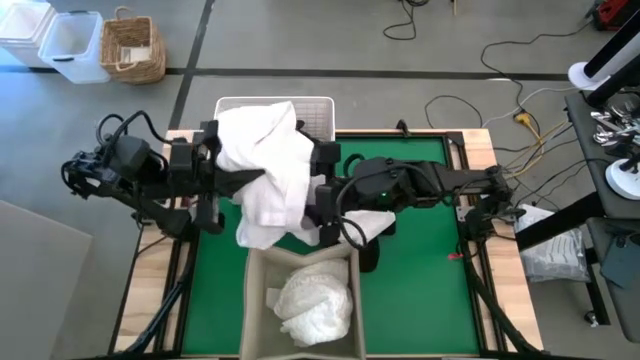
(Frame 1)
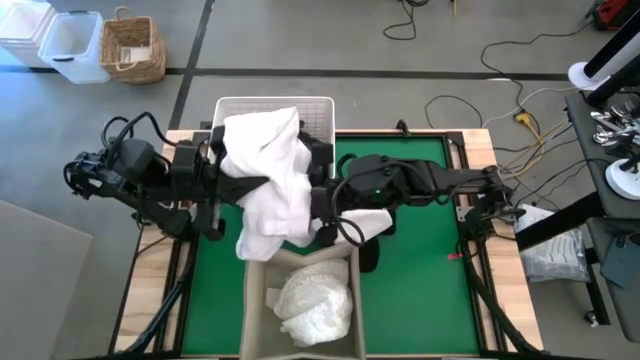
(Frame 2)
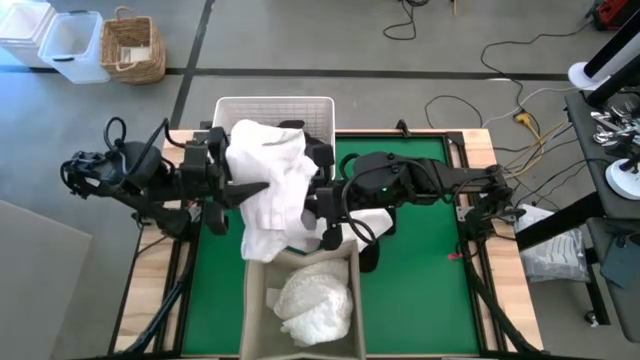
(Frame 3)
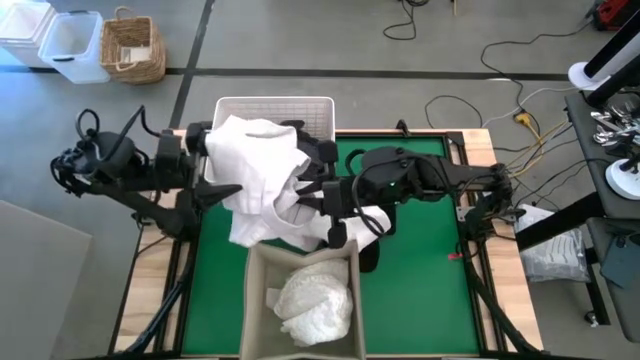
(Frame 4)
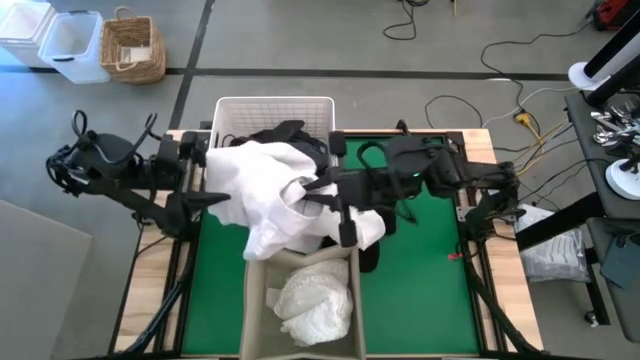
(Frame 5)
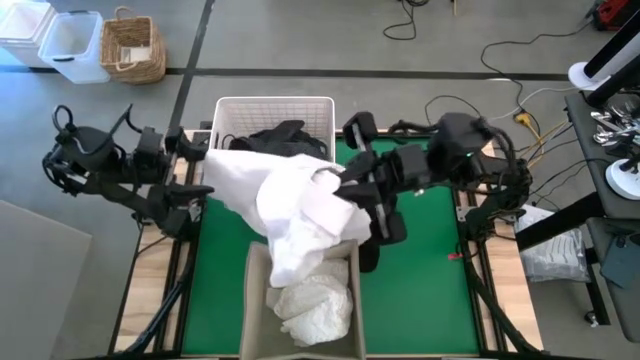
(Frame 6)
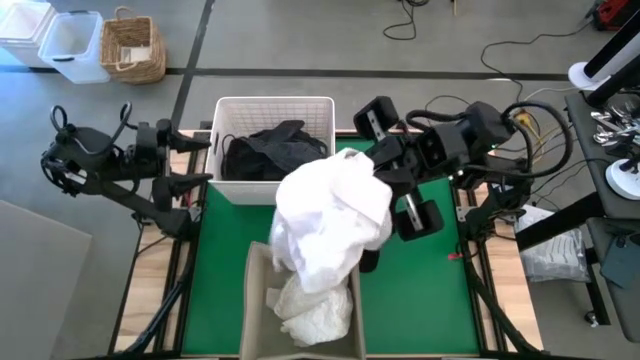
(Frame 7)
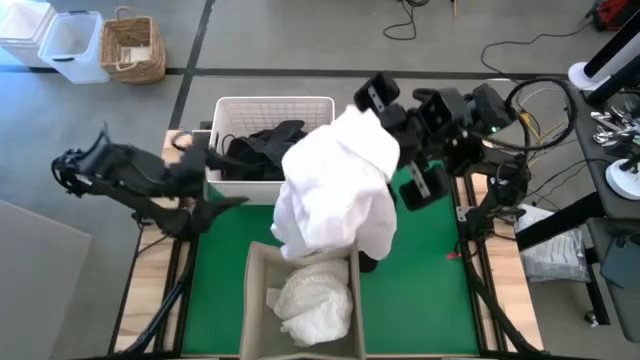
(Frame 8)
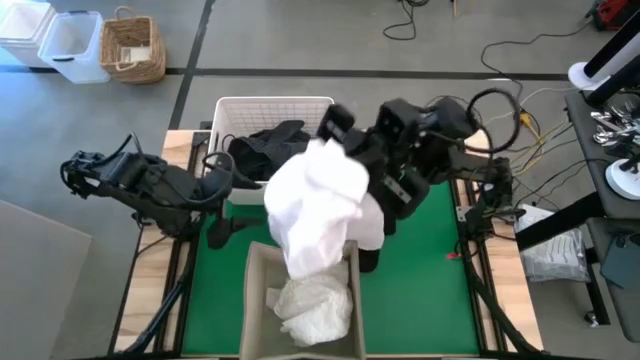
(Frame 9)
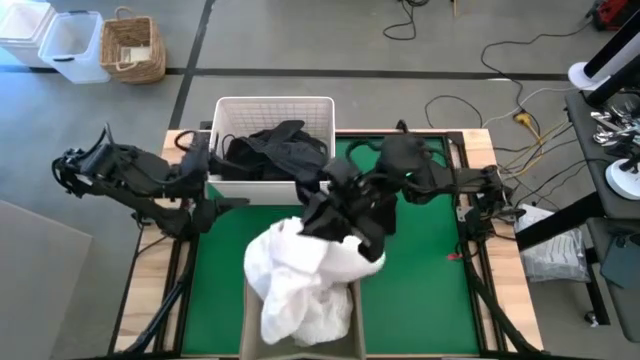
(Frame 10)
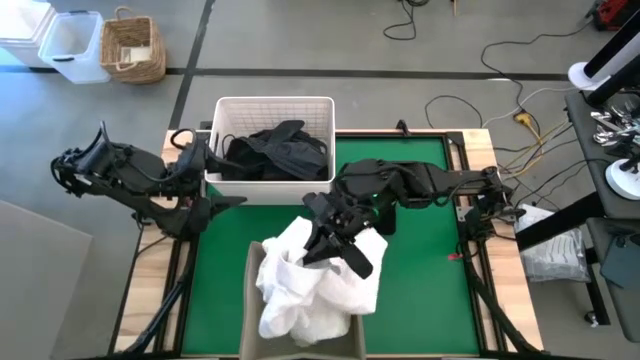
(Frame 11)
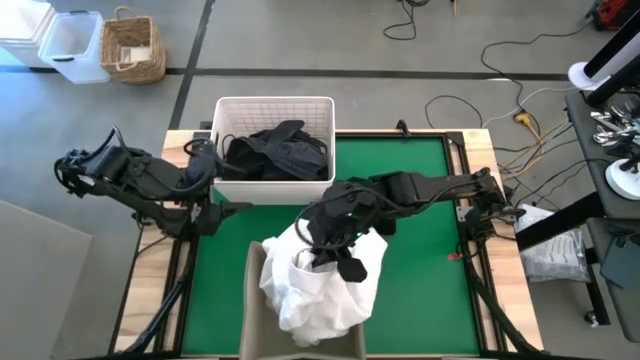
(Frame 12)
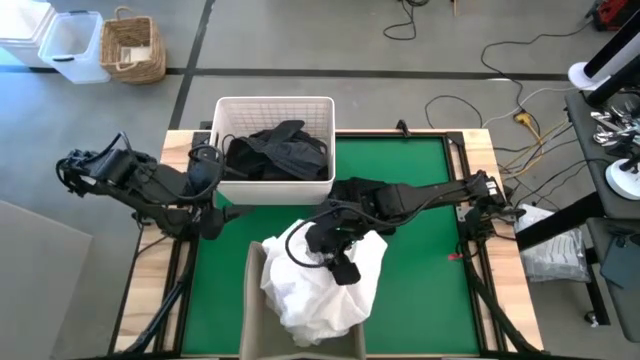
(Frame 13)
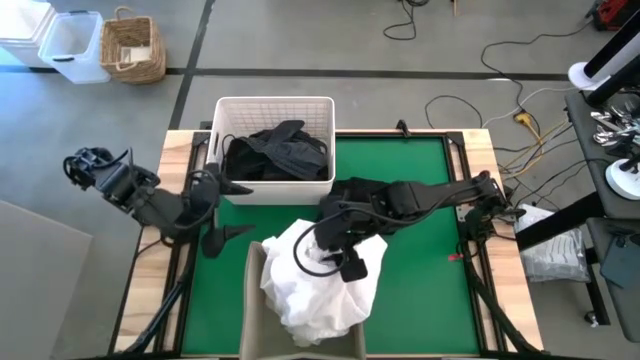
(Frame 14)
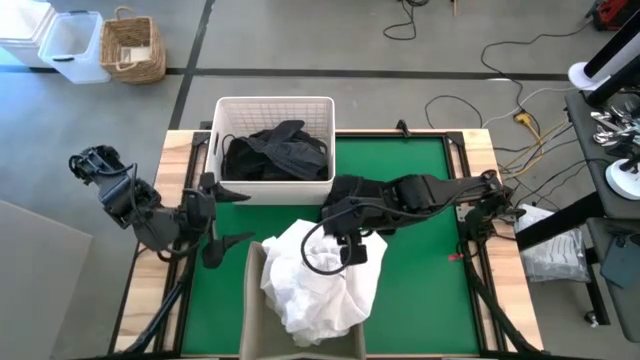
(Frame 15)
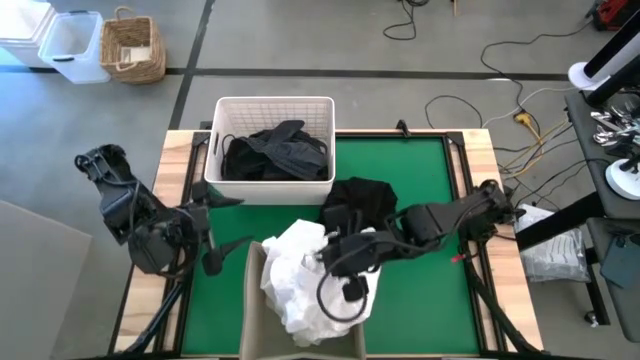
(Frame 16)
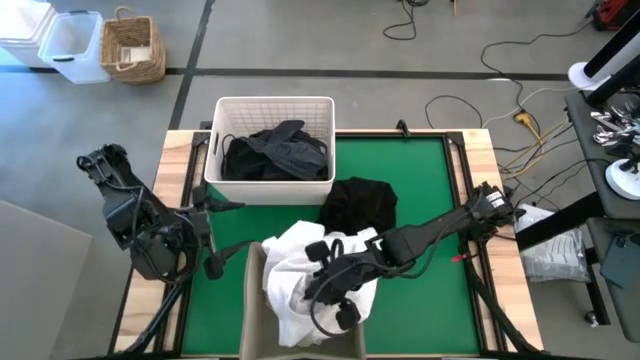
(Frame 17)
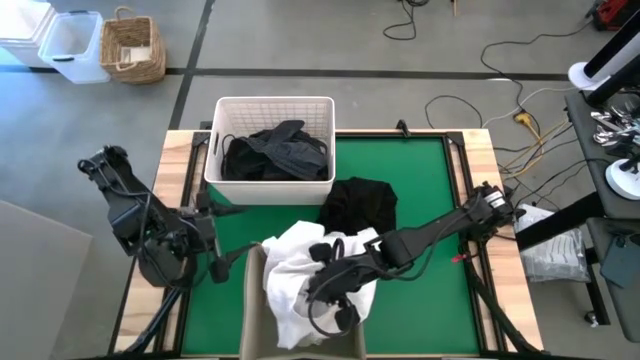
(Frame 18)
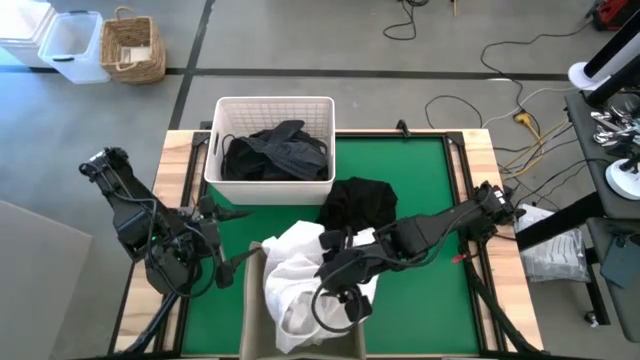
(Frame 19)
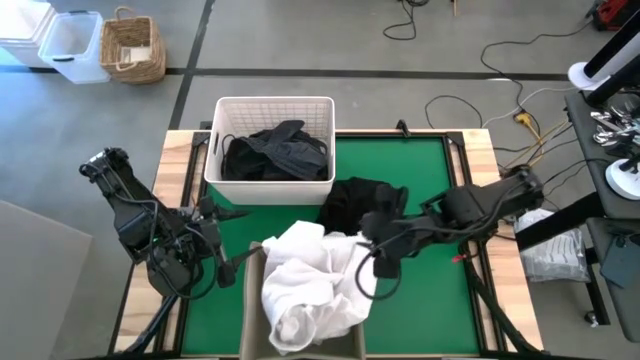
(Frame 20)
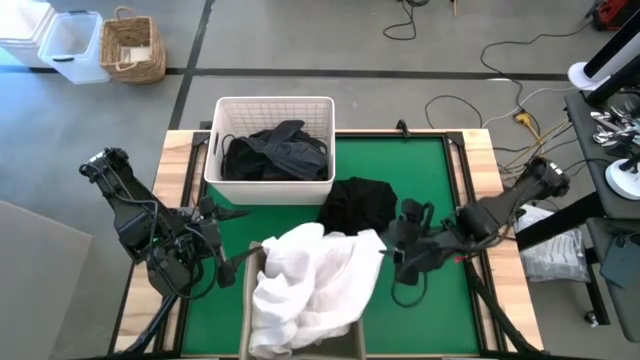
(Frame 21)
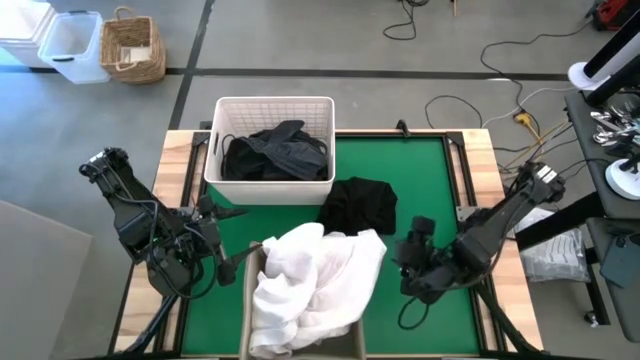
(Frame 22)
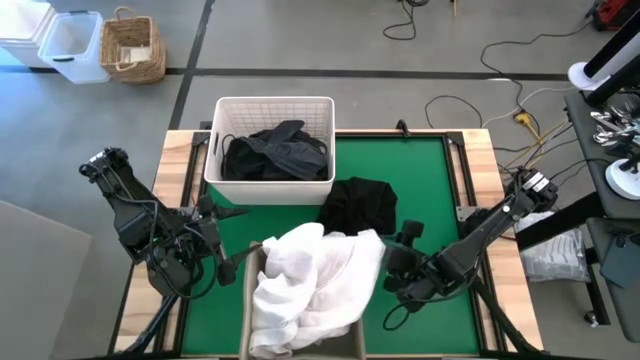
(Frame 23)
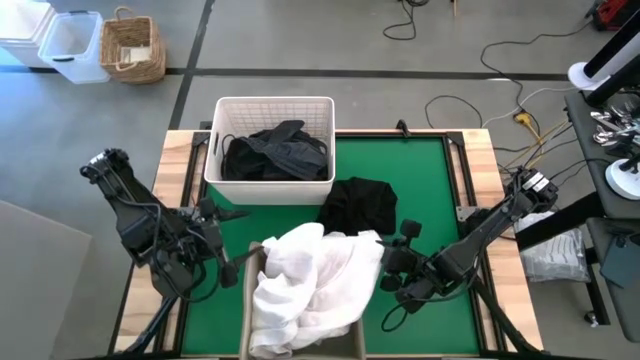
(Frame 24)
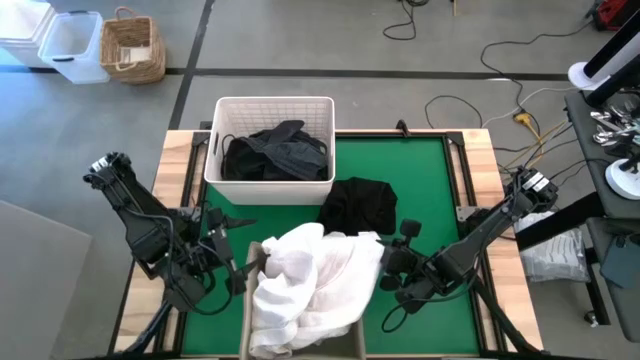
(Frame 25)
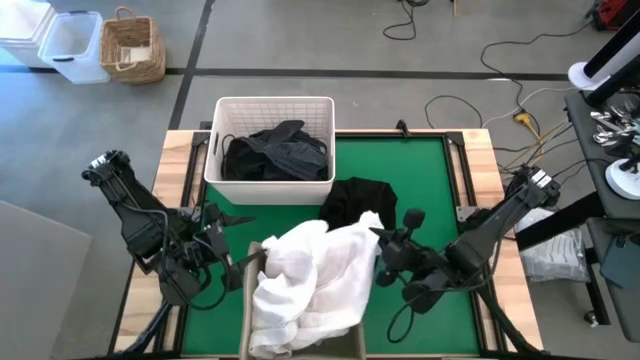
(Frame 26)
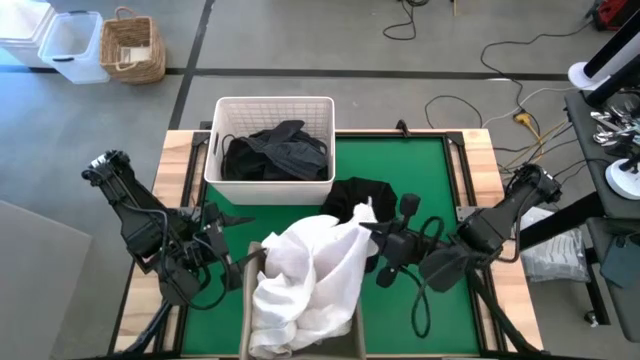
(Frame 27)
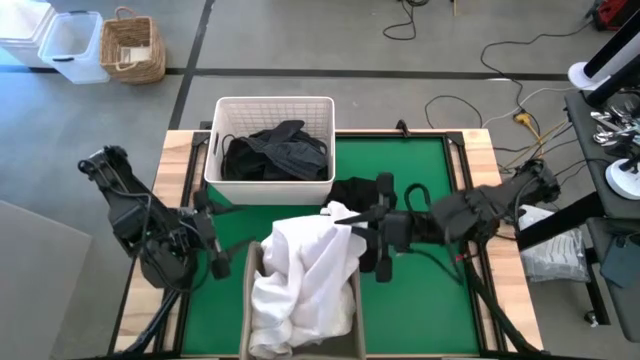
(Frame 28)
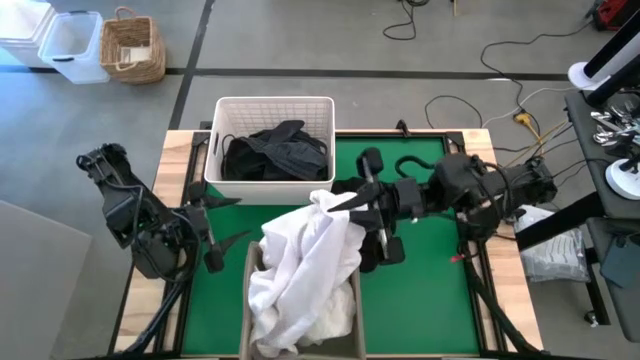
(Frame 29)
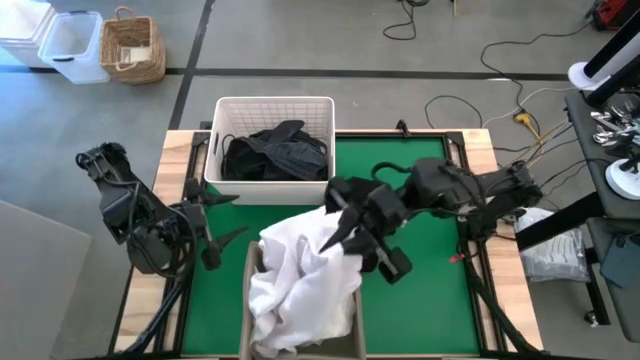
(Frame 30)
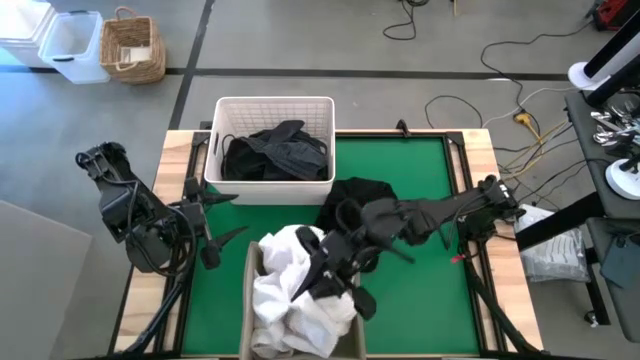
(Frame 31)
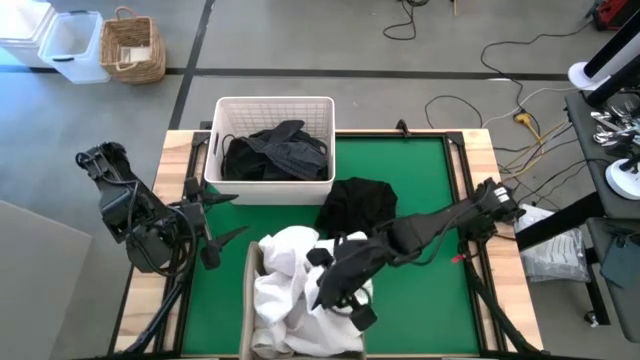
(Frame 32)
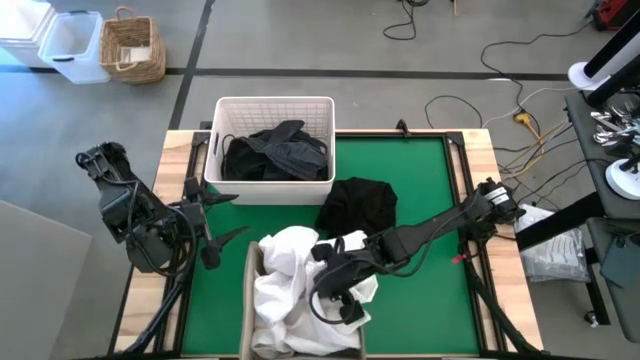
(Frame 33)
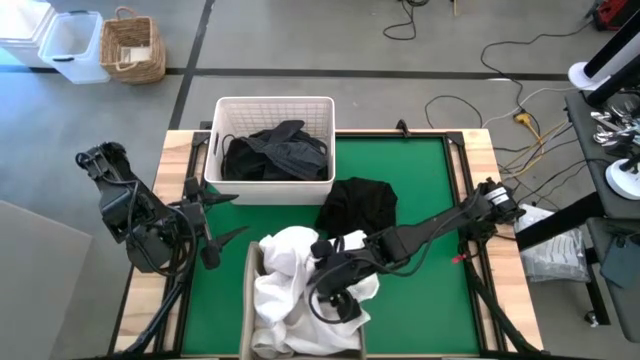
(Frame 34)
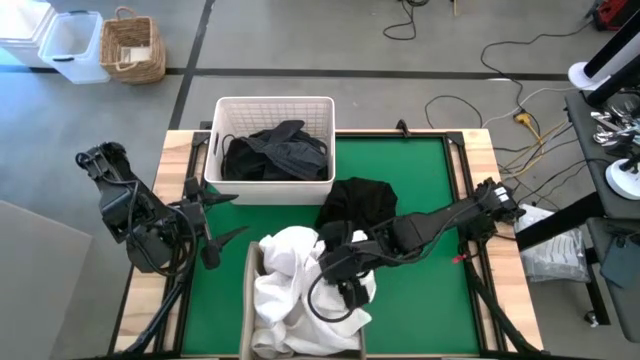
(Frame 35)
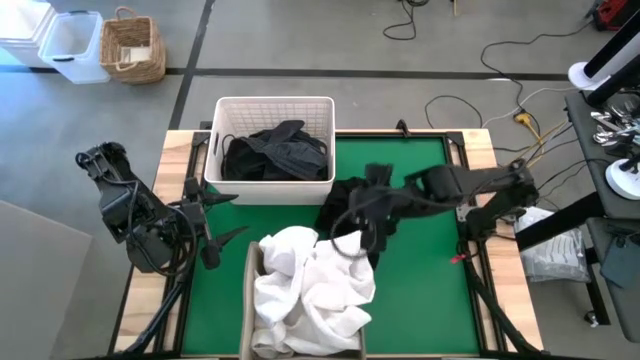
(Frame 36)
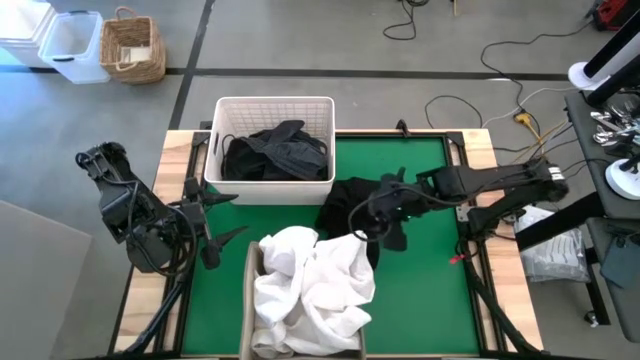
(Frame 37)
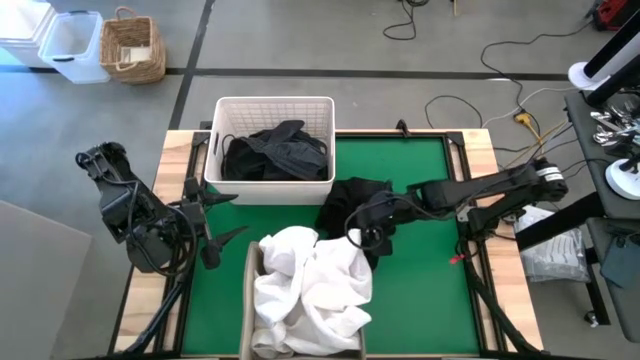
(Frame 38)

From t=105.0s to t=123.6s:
Put the white shirt into the laundry organizer
